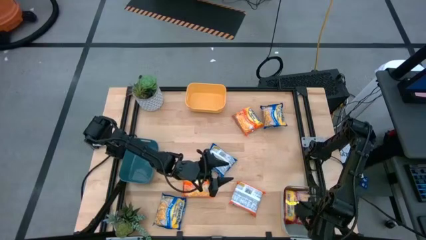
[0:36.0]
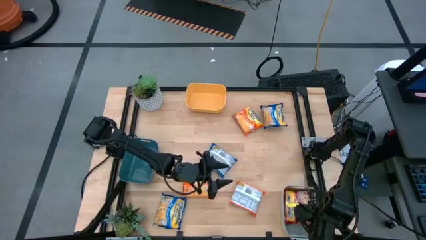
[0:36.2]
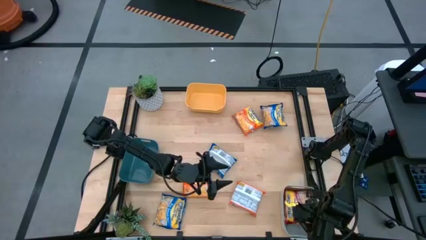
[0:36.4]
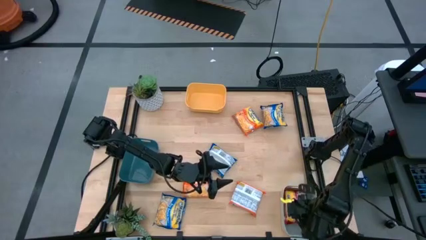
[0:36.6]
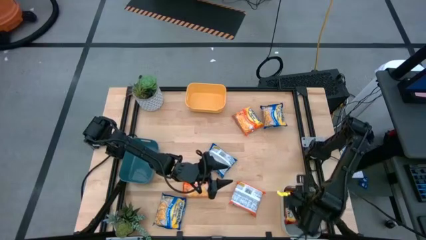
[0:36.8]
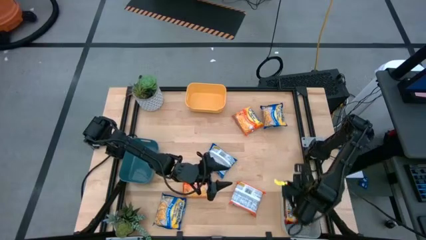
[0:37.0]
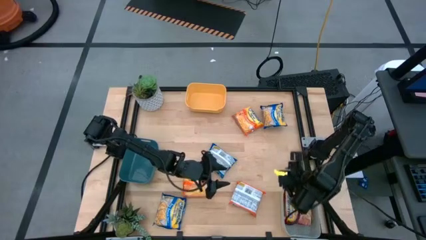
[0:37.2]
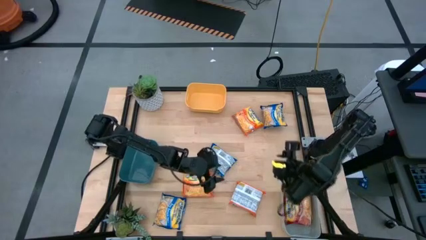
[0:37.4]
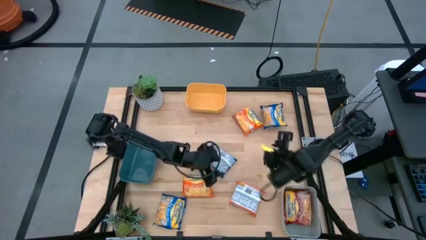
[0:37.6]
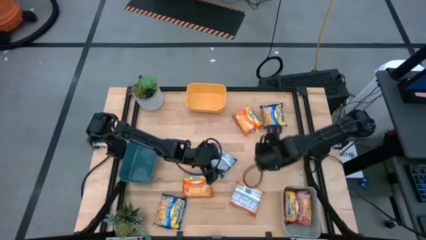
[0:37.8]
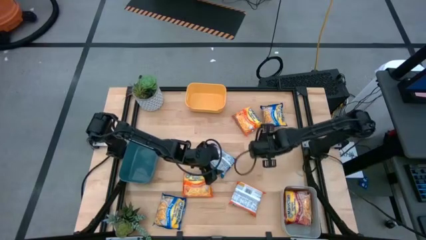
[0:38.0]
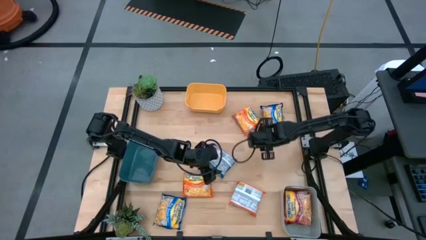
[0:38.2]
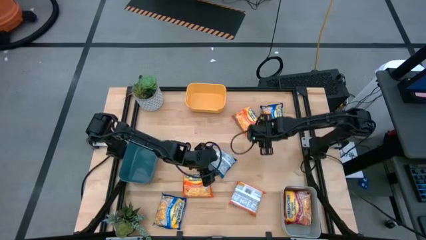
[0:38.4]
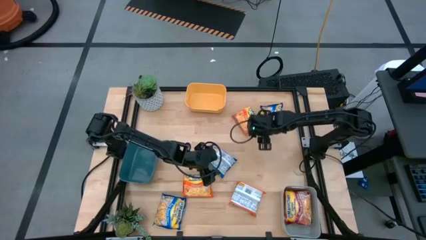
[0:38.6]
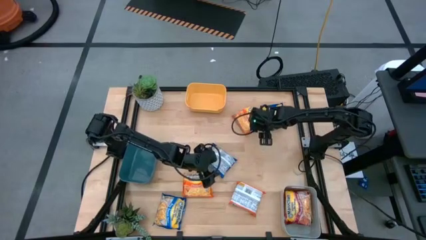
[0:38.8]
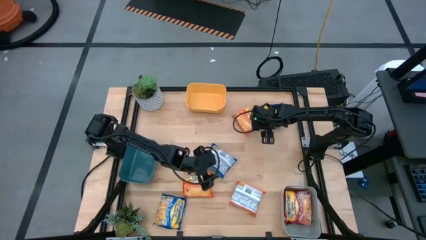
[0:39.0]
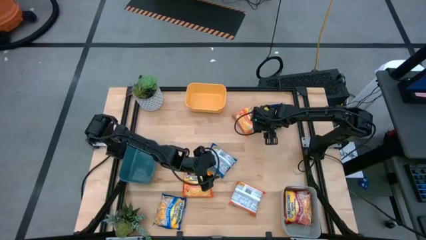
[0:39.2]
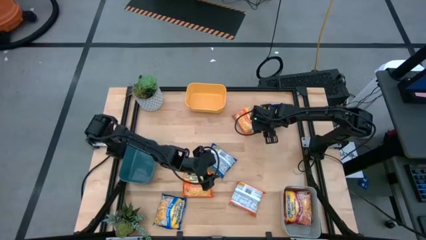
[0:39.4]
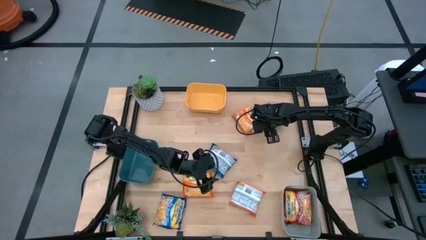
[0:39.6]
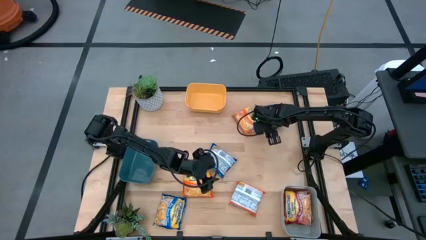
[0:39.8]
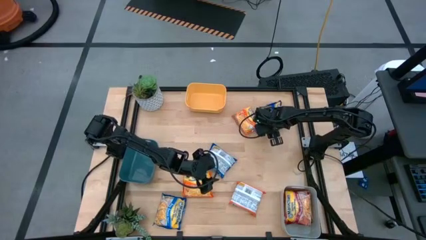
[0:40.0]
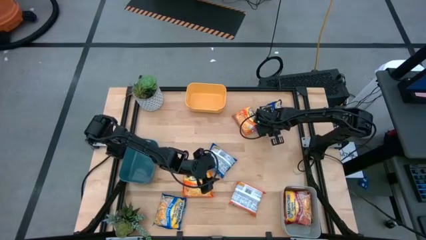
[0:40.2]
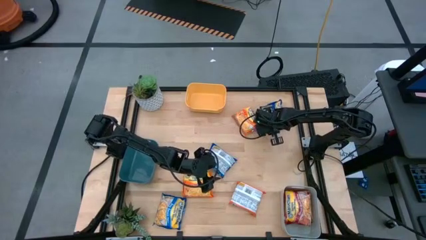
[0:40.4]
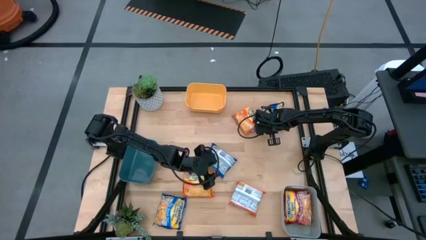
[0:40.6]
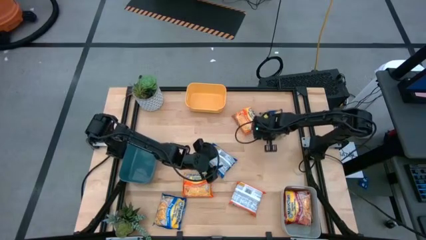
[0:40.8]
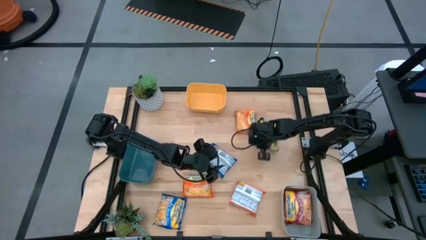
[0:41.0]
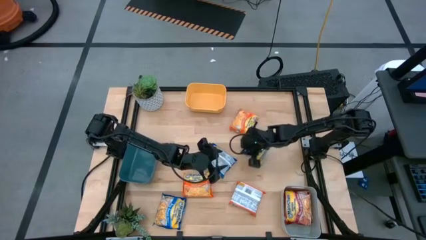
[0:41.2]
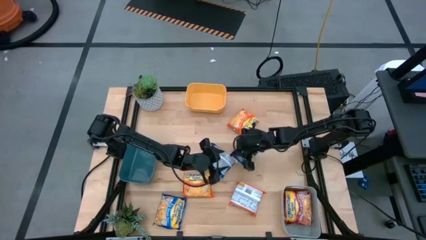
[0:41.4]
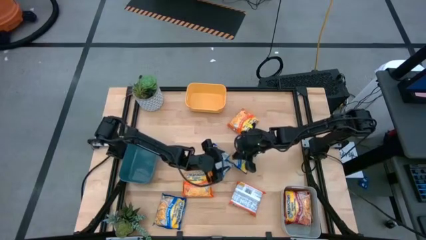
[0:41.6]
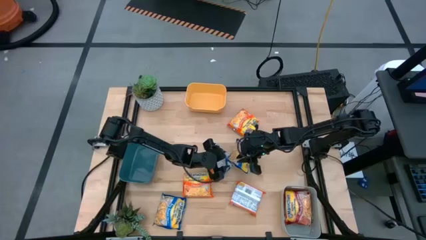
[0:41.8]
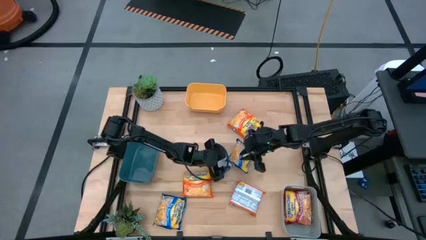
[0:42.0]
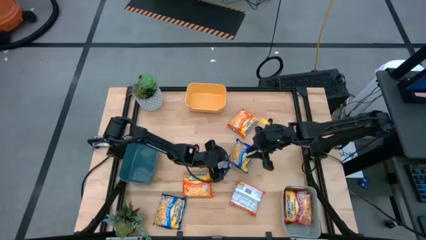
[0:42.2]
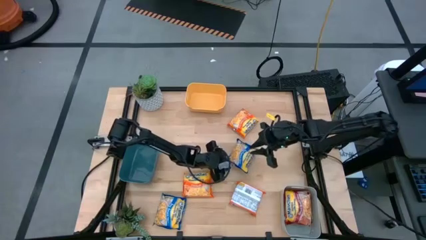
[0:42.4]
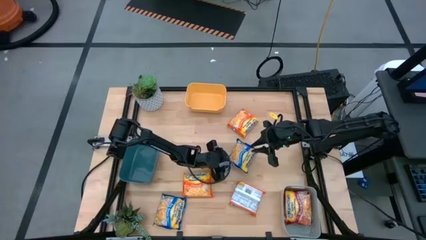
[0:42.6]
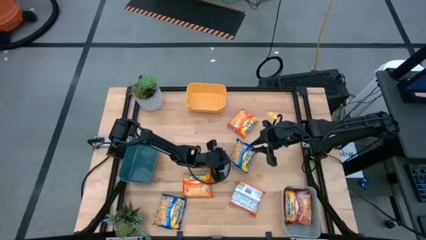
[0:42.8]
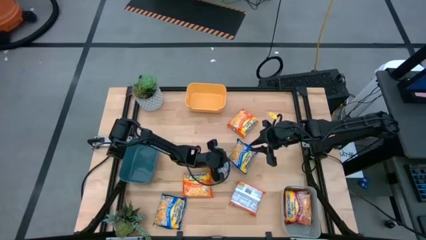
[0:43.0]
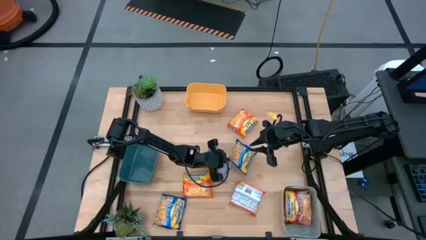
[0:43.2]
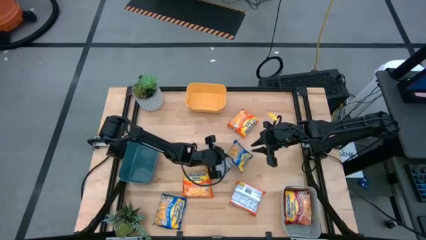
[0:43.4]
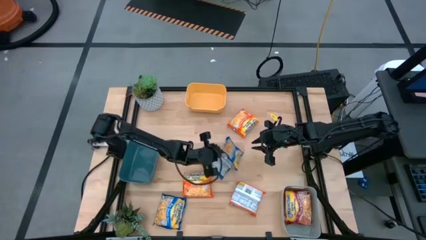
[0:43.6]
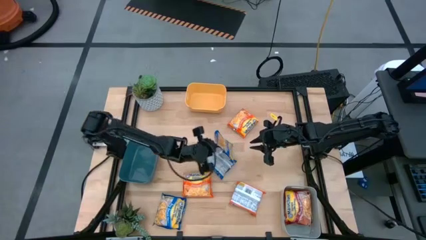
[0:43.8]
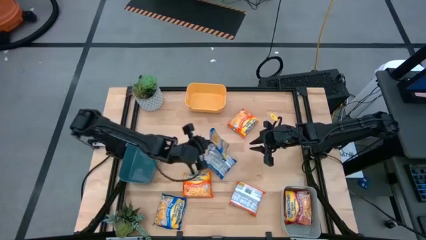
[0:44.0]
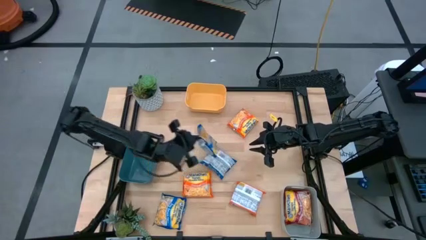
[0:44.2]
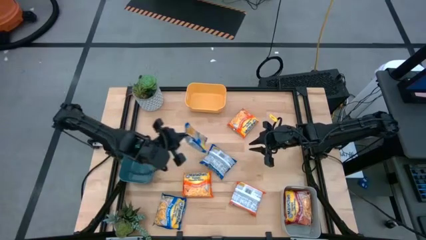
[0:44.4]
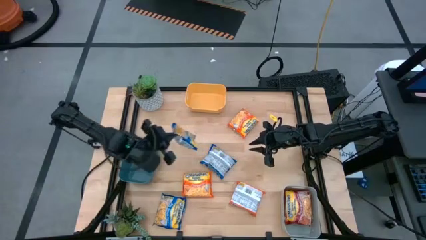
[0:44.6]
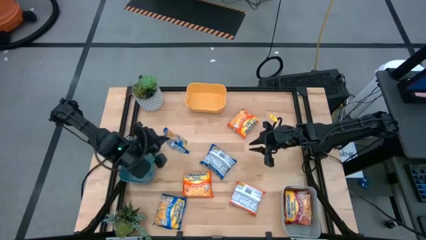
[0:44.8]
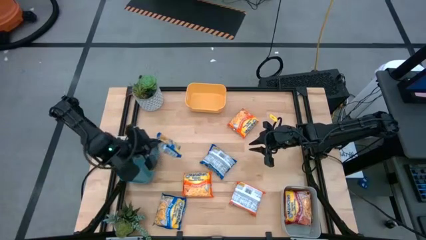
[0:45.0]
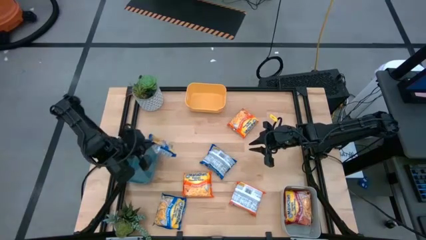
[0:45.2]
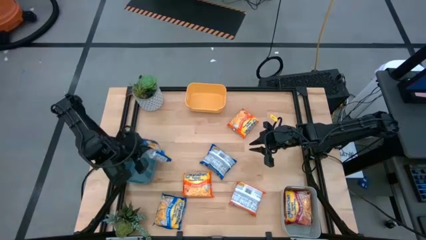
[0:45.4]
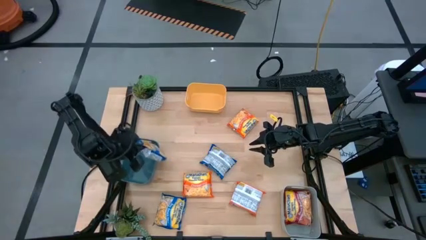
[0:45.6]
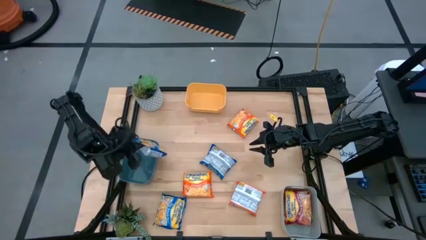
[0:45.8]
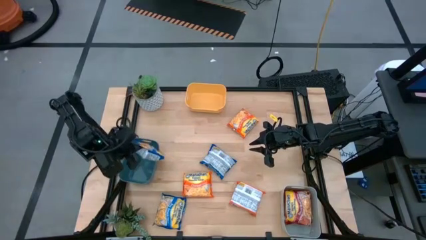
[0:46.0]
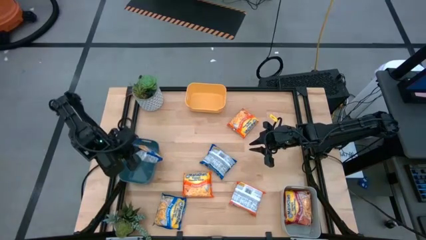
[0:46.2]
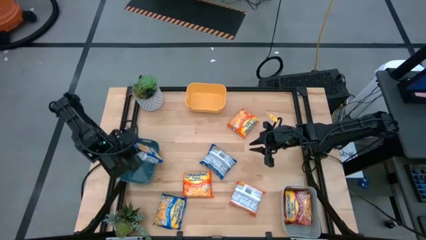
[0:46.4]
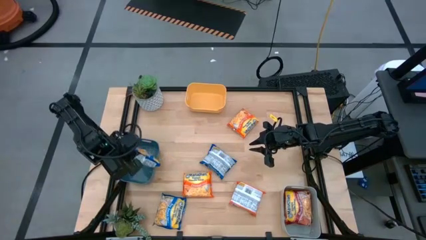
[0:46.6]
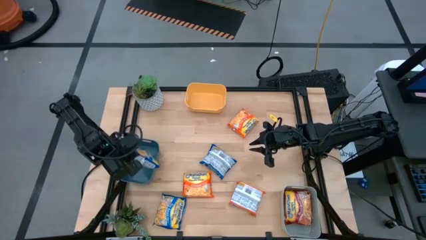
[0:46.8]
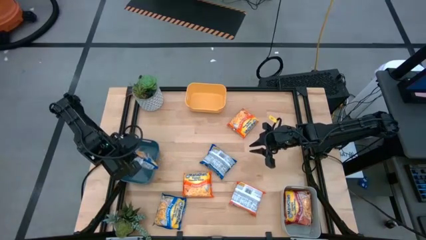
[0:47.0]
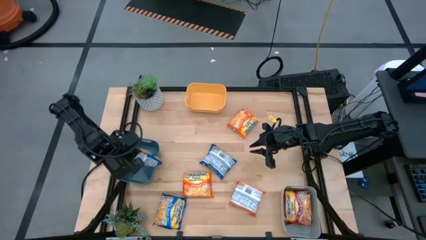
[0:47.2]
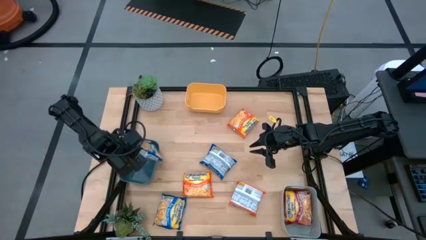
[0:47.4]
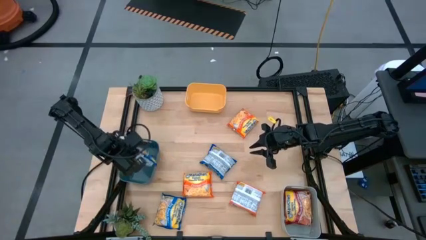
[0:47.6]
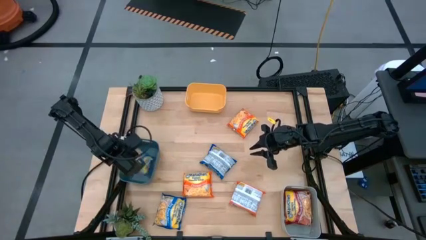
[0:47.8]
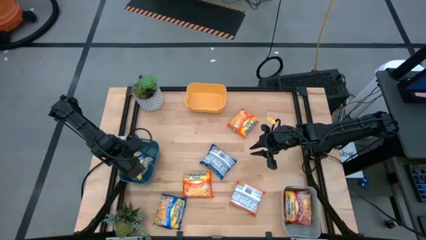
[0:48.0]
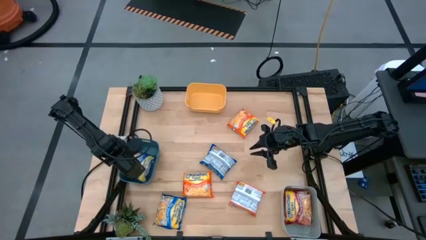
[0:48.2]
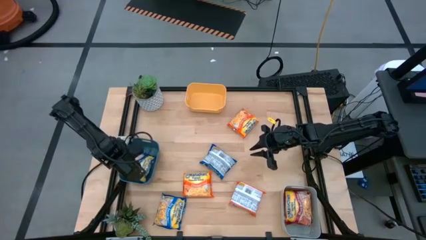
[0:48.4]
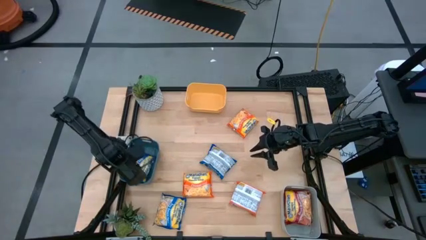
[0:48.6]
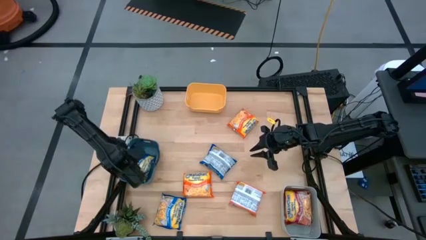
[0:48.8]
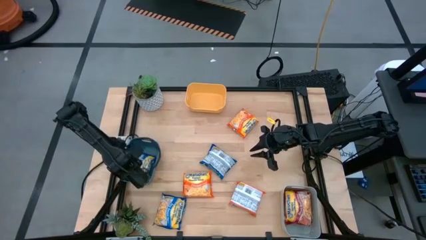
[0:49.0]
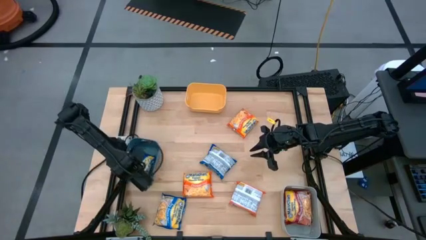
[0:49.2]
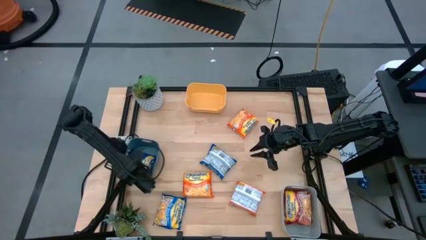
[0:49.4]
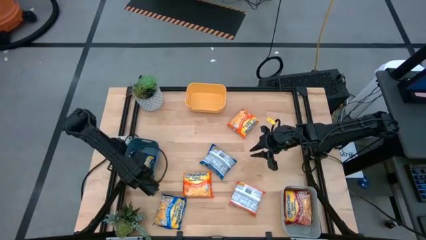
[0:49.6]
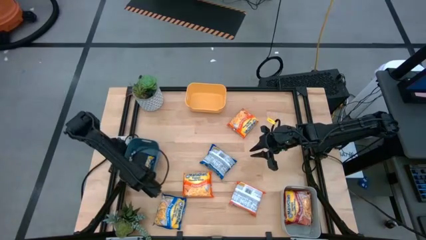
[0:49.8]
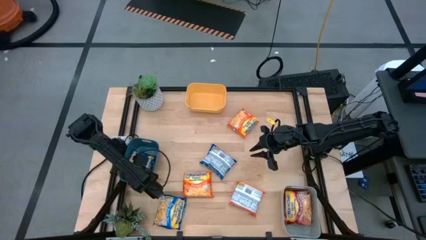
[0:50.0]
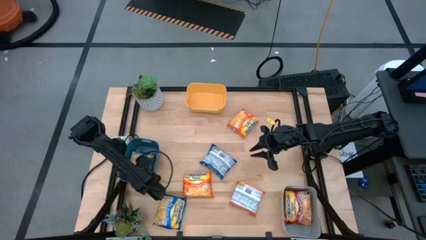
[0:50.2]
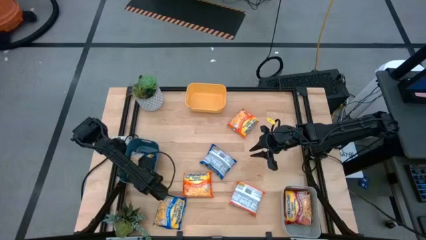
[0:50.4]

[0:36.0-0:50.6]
Task: Sort Maruchan noodles
Put the top right blue noodle pack into the blue bin

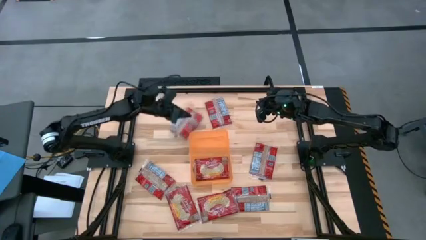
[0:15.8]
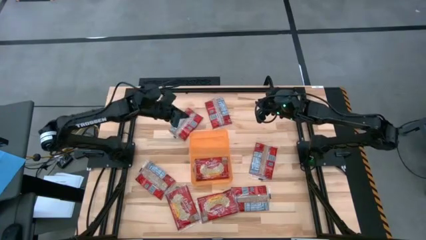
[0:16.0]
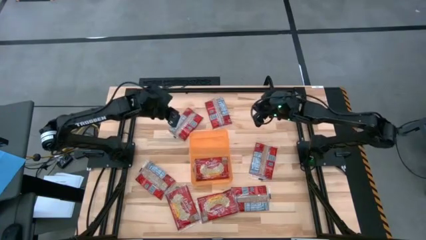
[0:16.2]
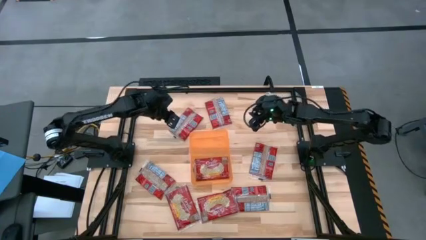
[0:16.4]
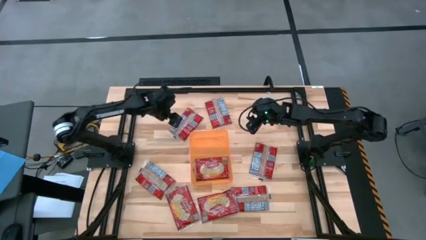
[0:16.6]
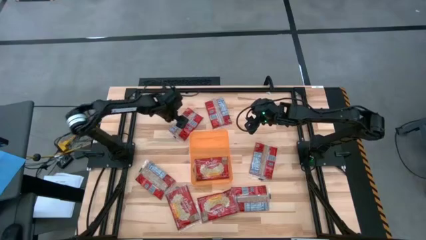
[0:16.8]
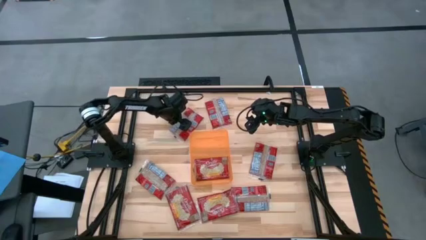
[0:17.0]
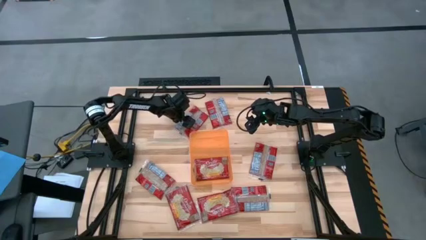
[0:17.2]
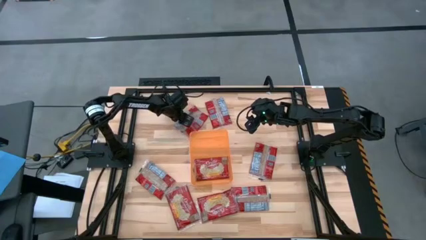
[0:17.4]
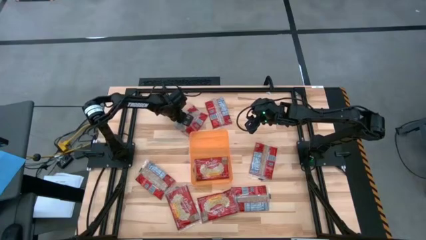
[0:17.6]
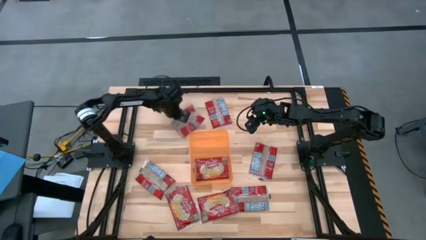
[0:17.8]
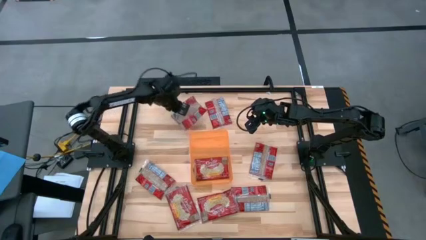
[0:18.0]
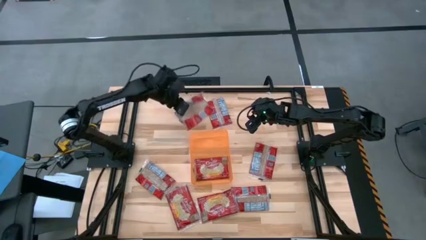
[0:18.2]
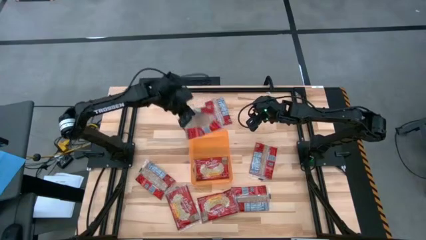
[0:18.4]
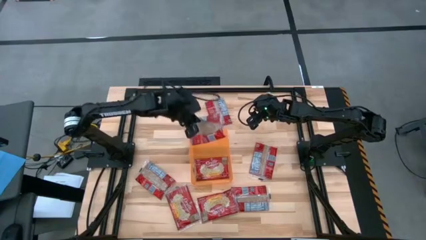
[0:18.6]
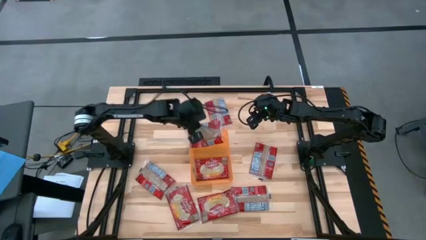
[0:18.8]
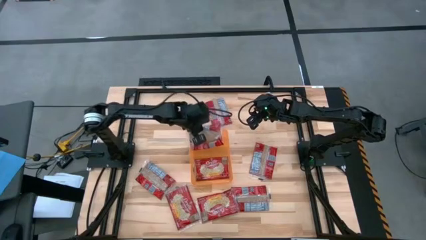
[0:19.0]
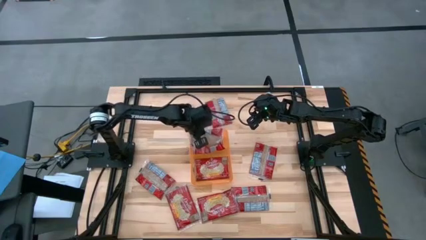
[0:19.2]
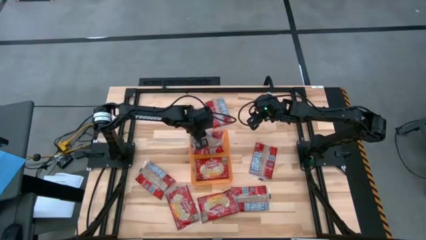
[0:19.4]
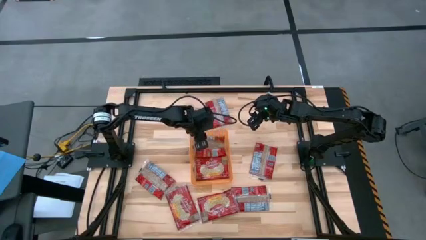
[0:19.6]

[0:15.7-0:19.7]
Task: Sort popcorn bags into baskets
Put the red popcorn bag into the orange bin
